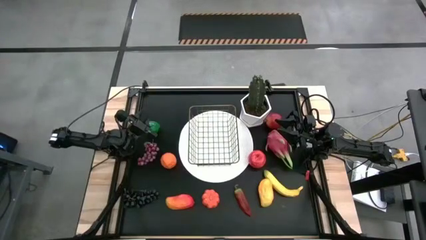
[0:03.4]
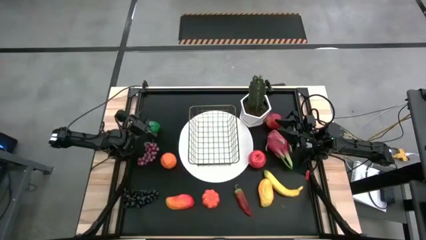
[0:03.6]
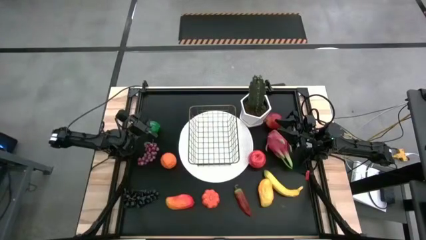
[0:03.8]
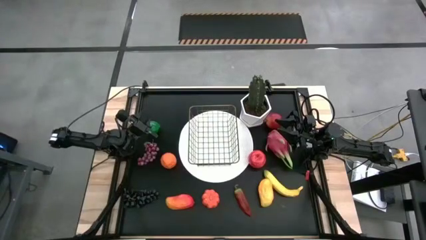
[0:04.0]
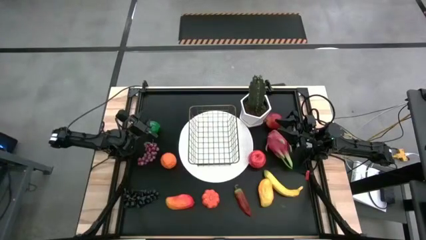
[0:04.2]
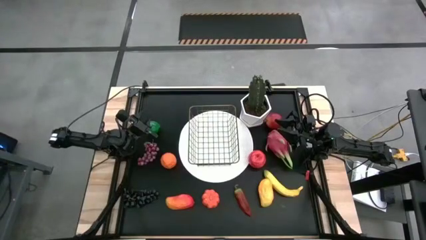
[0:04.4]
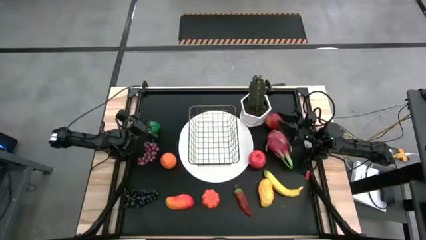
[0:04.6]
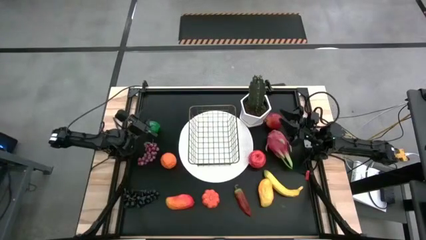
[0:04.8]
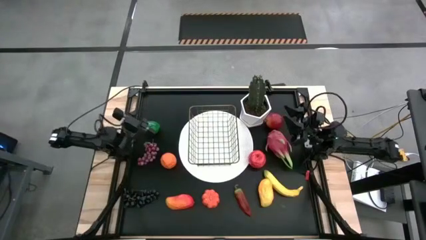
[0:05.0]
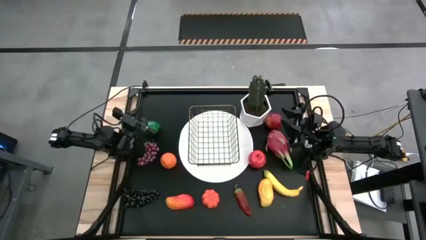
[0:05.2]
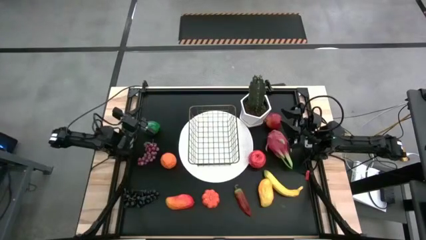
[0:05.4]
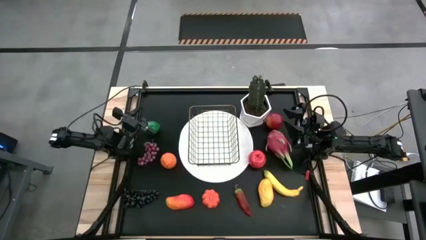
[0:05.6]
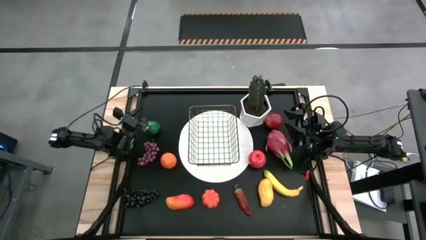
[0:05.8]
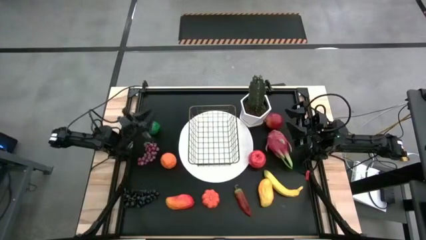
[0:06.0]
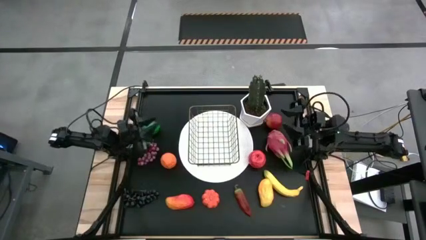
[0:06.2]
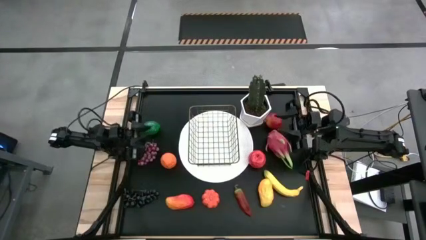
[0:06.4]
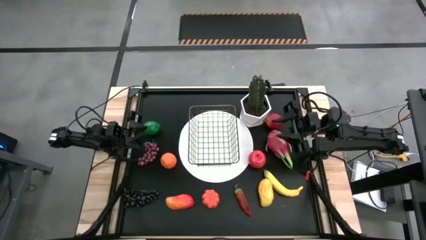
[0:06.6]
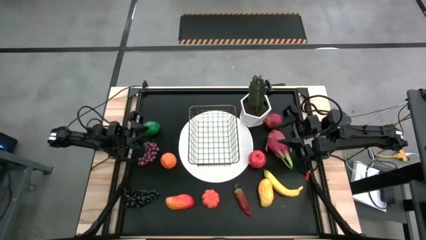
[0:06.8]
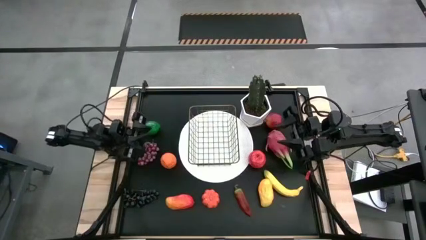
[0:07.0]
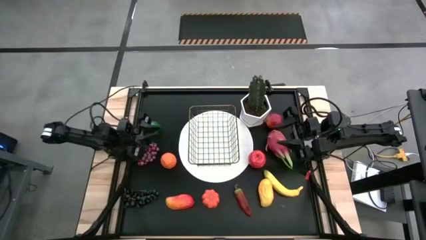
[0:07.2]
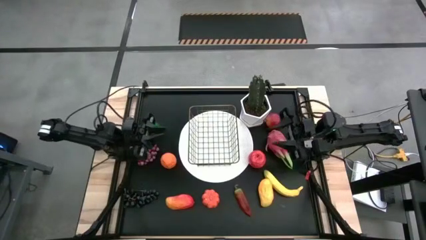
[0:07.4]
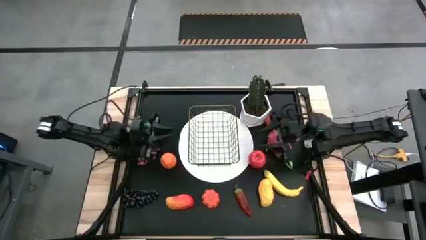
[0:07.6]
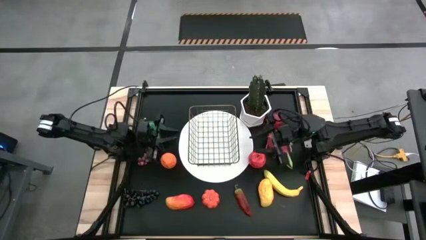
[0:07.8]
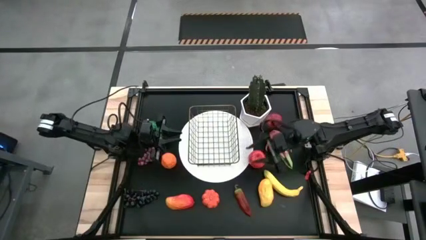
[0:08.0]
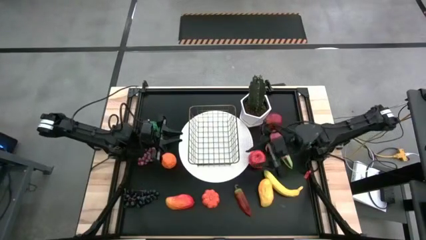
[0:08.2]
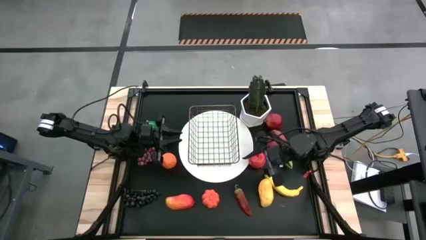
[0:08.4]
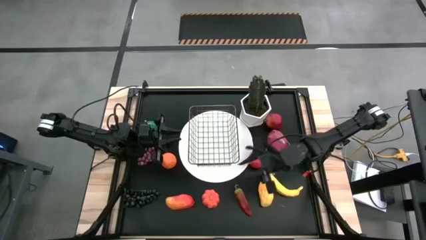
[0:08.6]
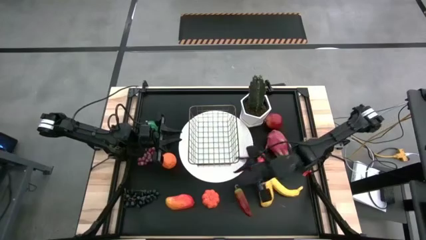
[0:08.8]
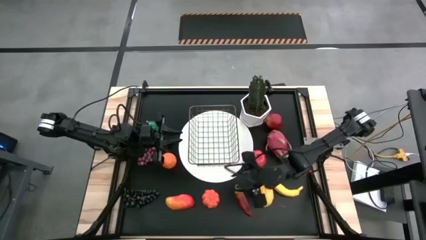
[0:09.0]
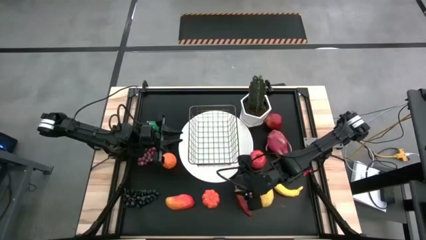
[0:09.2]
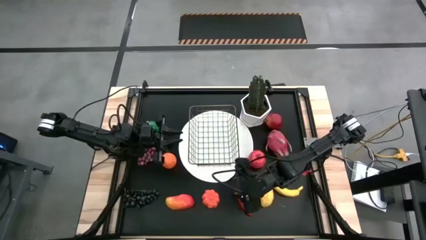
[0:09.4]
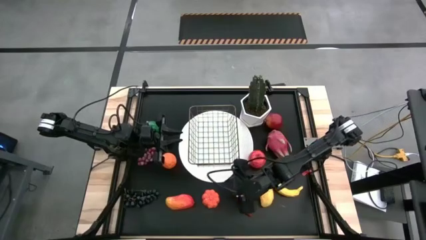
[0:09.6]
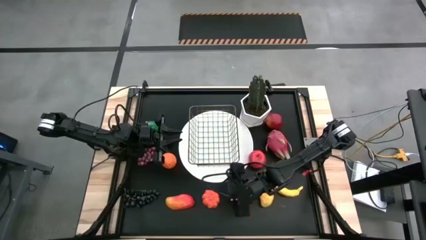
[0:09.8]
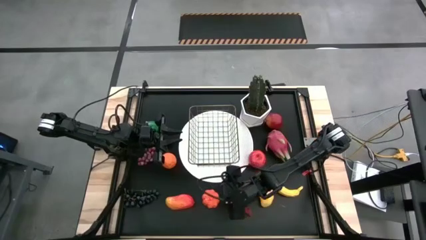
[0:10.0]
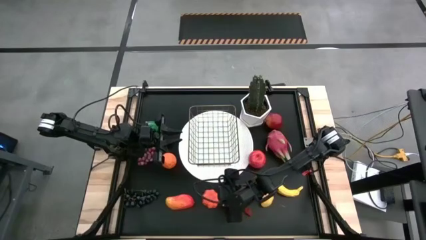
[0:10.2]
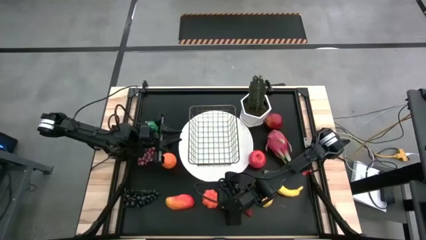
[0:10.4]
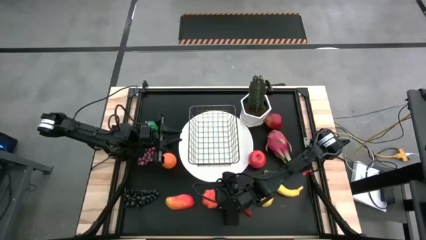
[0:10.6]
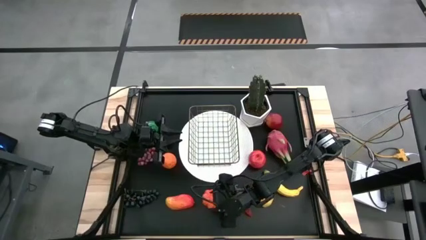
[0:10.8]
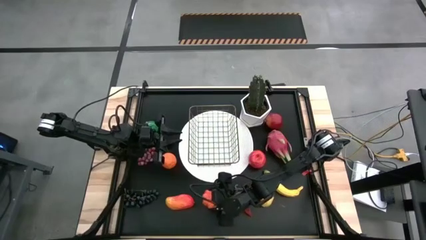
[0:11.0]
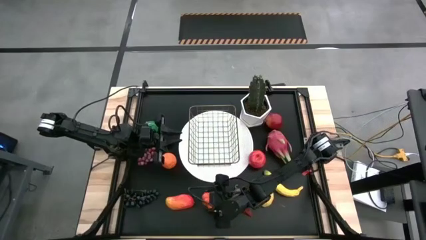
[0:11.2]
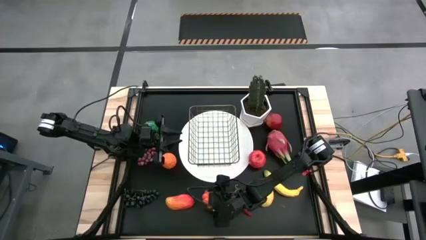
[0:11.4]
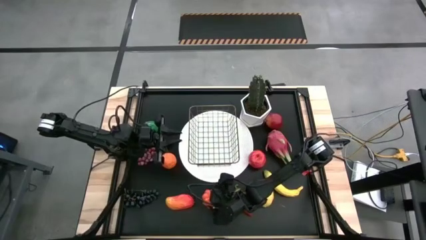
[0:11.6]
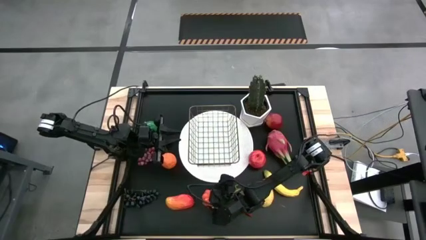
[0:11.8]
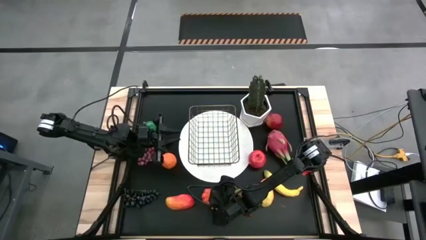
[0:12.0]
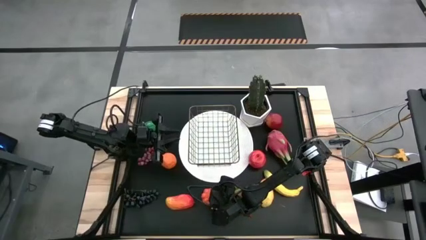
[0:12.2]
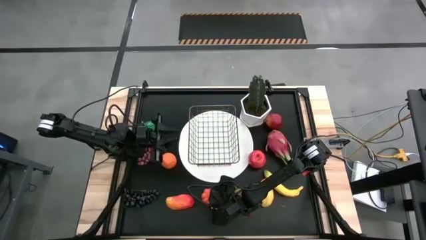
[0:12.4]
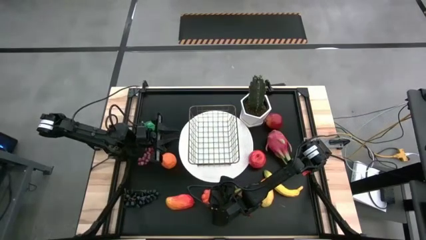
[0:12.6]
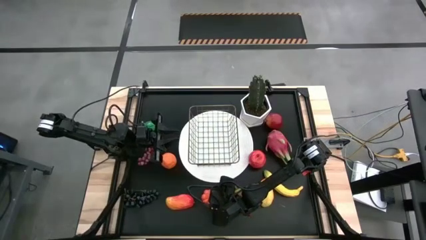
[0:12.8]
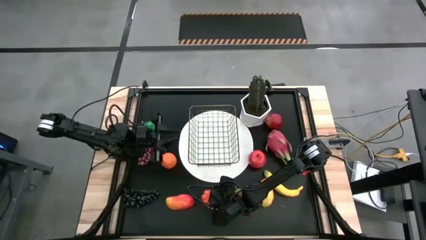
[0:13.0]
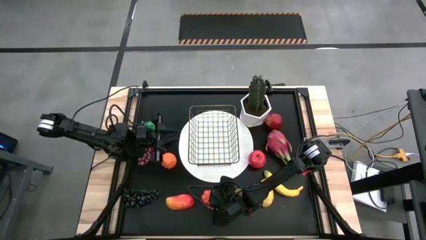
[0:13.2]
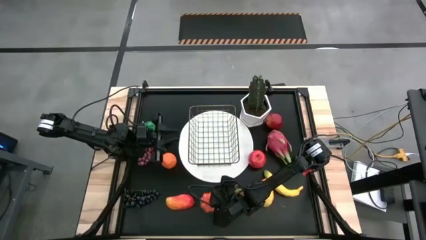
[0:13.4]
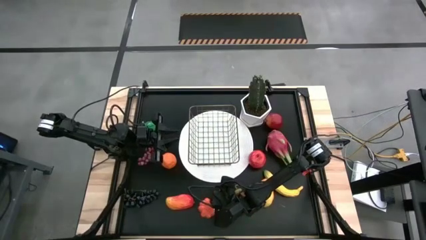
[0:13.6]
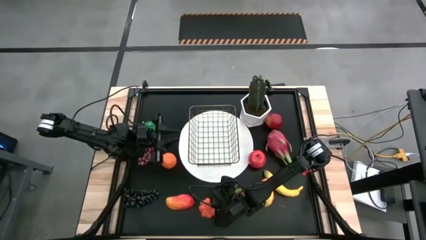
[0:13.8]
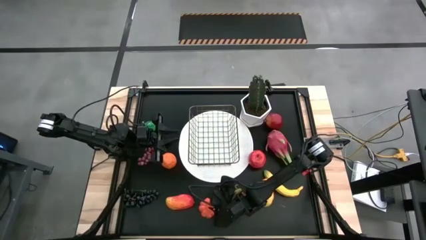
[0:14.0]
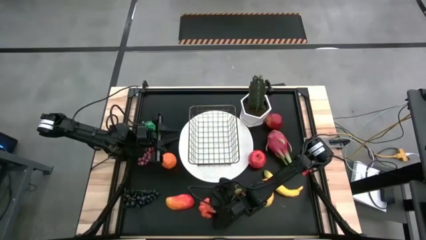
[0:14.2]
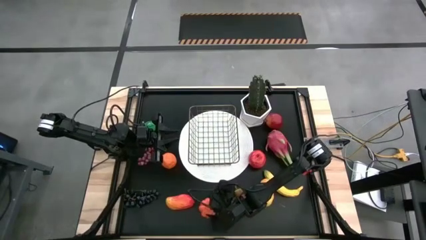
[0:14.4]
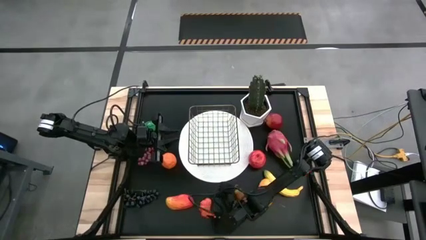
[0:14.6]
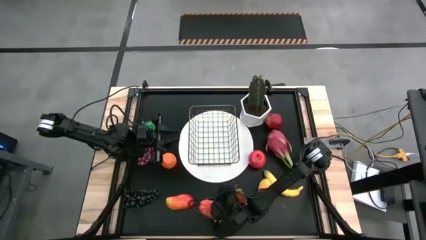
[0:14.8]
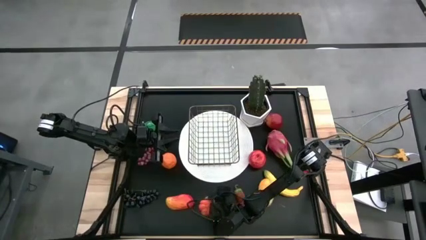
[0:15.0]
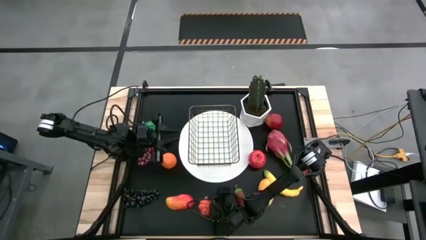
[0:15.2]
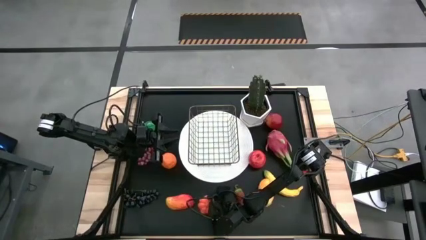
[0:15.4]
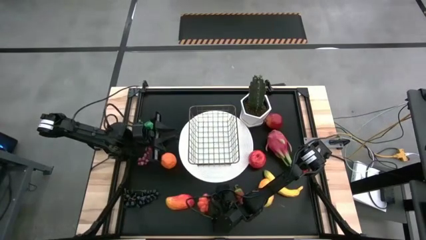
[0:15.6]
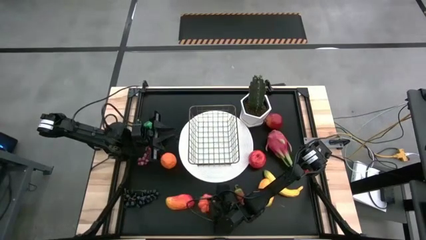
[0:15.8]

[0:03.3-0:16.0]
Task: Build produce basket
Put the pumpkin into the gold wire basket

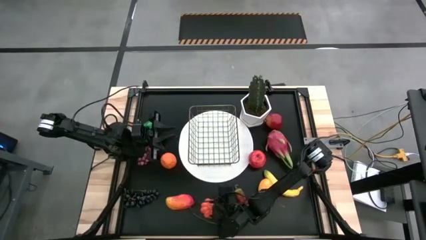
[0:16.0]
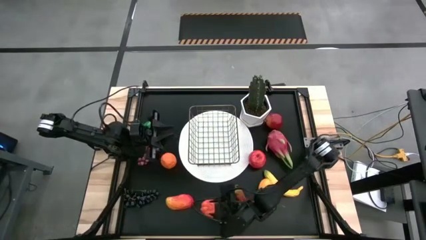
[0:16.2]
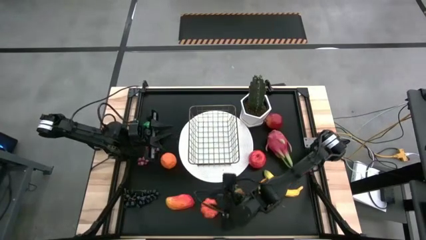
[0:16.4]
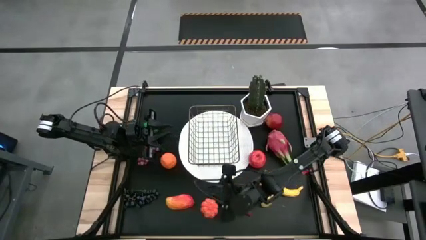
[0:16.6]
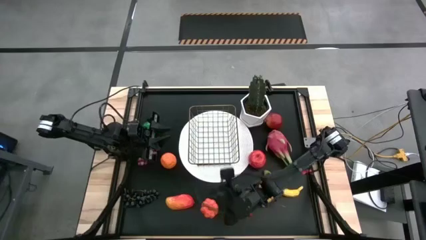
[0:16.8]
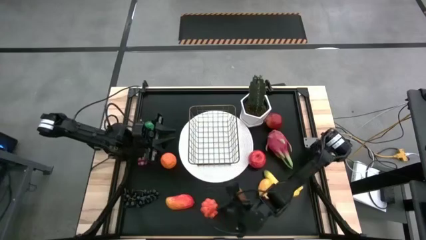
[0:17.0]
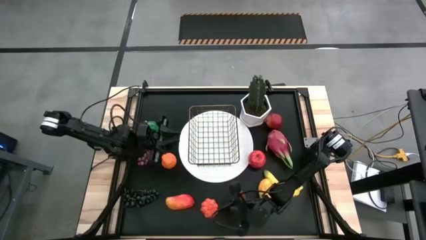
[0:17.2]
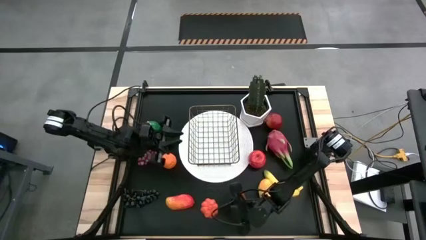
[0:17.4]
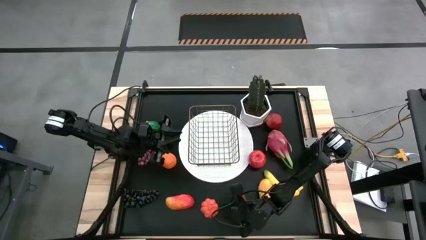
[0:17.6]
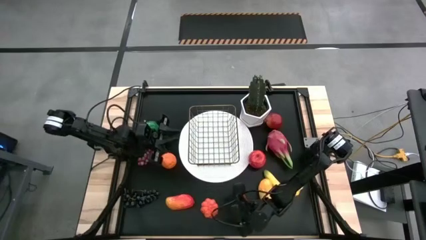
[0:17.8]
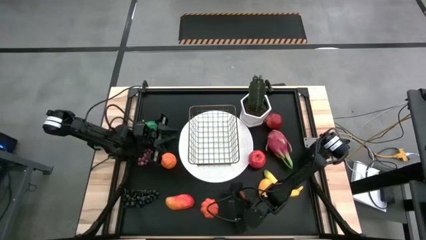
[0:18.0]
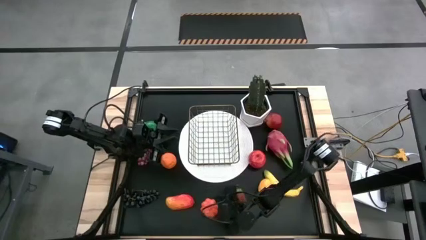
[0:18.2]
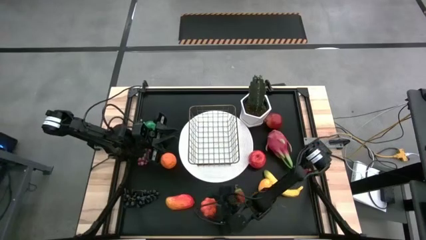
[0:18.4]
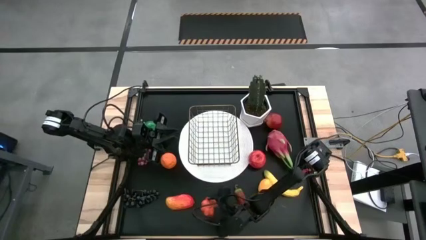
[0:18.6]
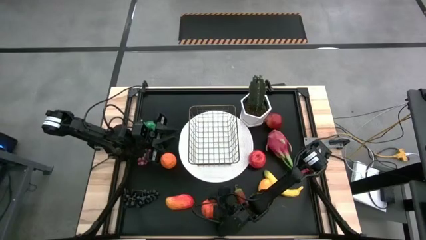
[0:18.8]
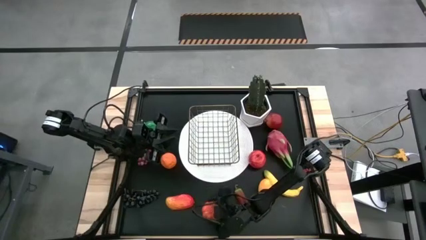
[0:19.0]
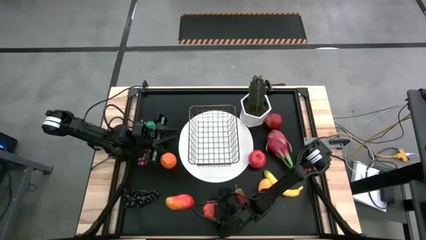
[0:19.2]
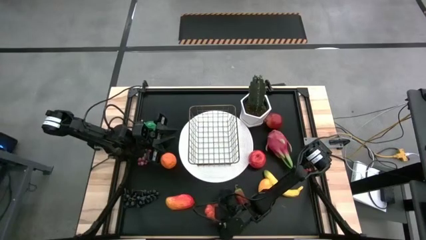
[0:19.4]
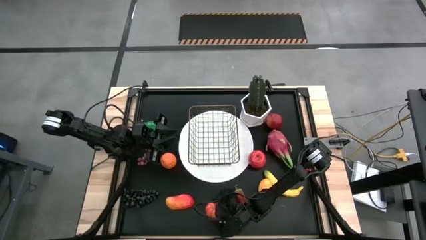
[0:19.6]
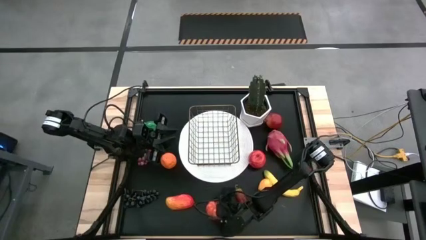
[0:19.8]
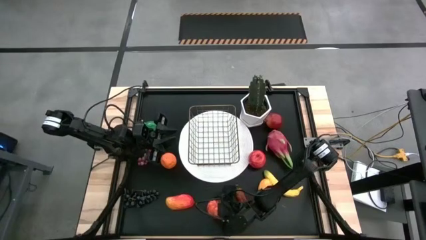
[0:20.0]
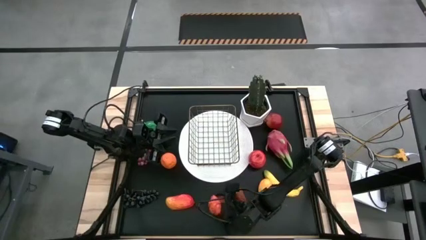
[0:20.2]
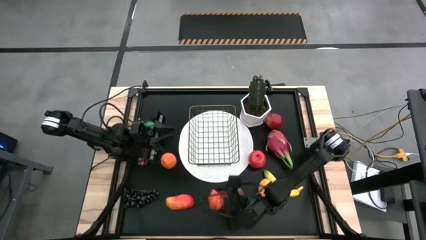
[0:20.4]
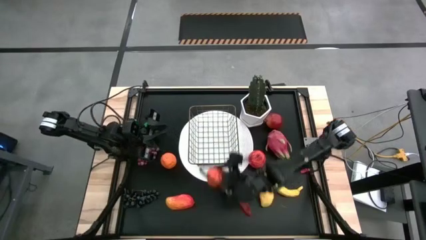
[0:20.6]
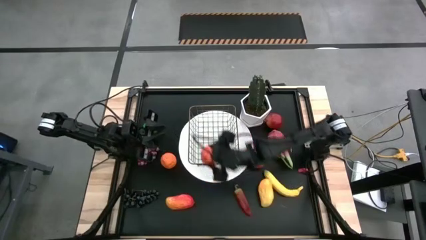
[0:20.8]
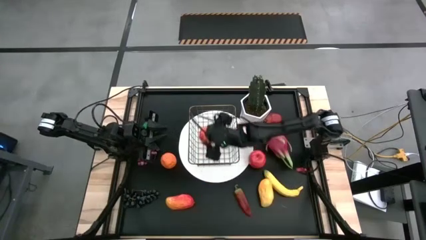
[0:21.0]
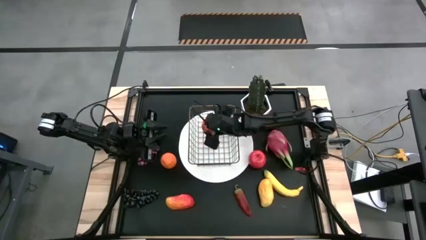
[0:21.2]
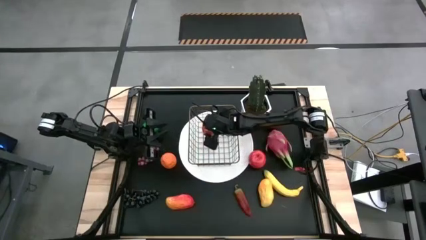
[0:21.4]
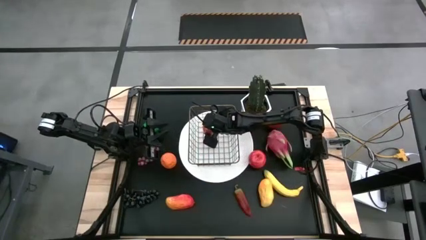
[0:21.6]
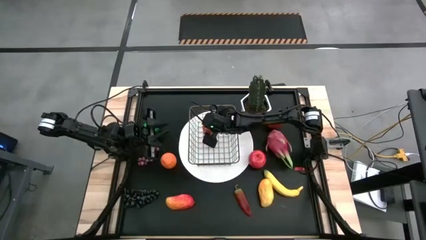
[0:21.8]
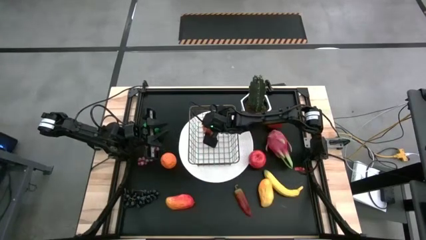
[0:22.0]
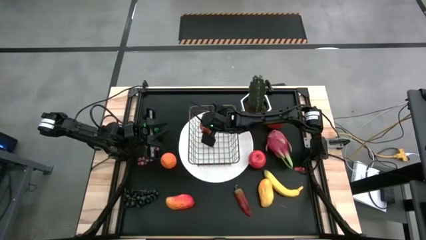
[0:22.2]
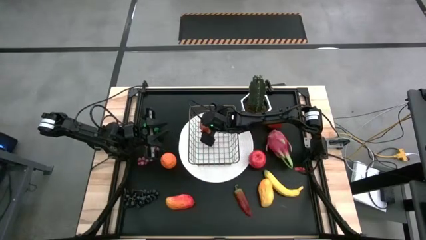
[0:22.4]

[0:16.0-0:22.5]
Put the pumpkin into the gold wire basket
